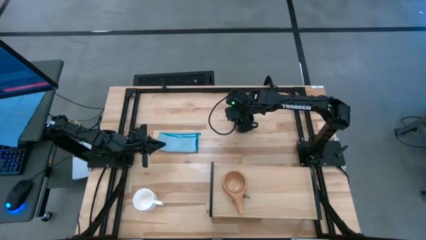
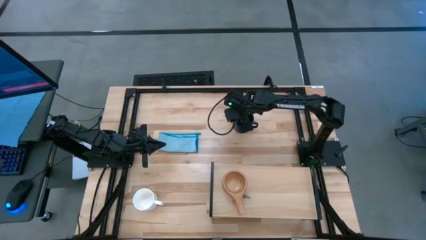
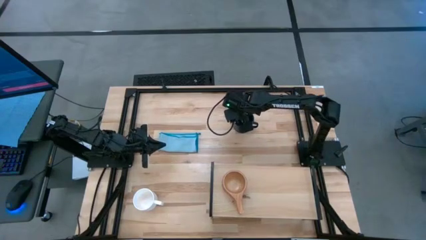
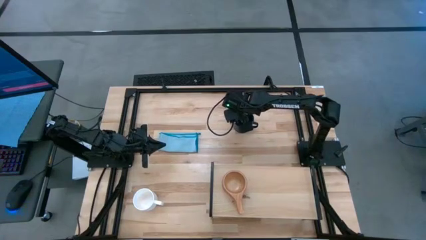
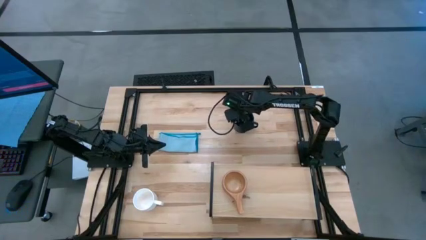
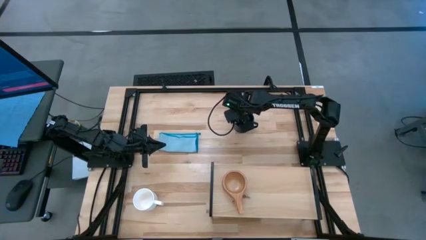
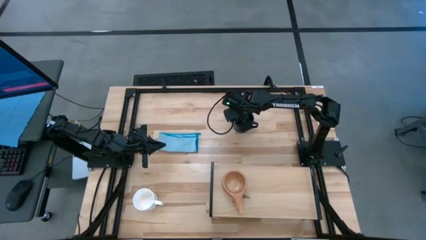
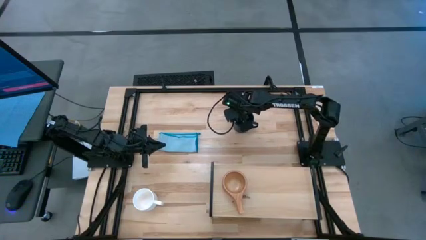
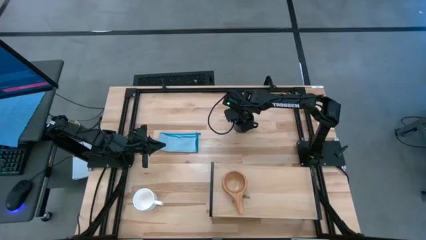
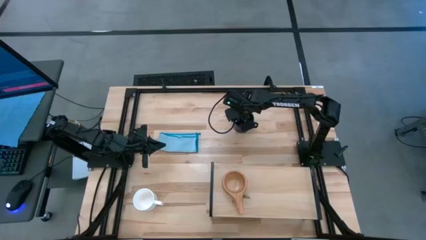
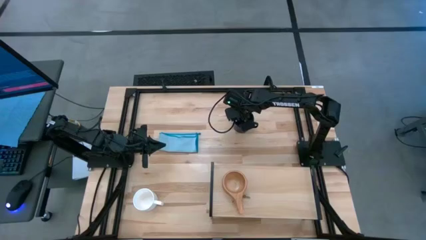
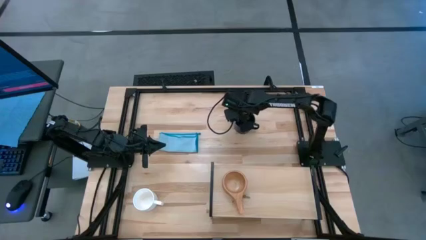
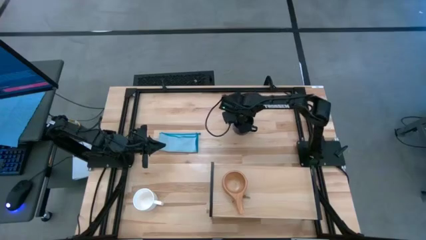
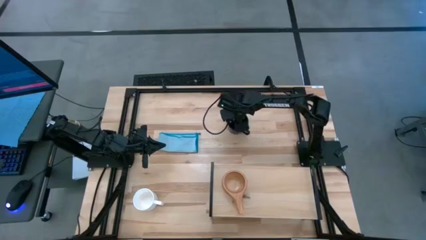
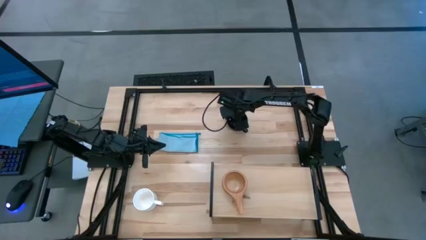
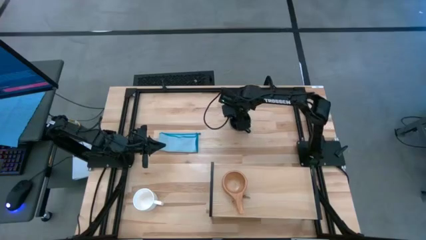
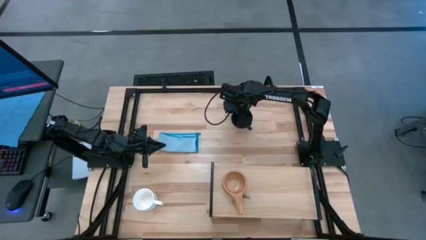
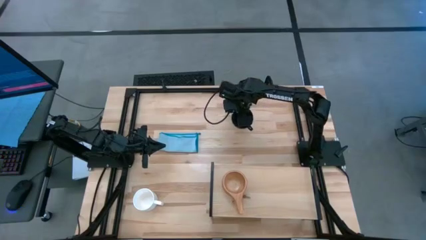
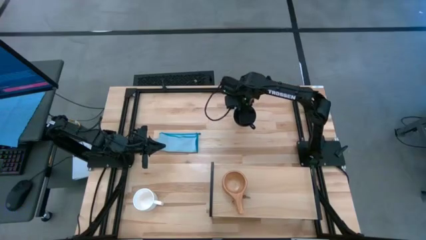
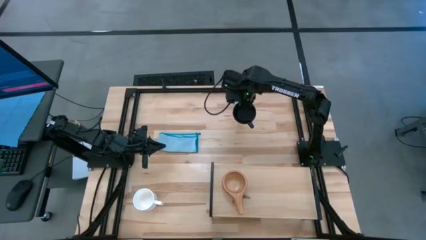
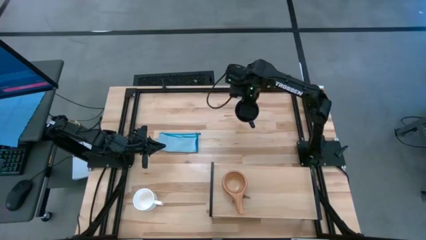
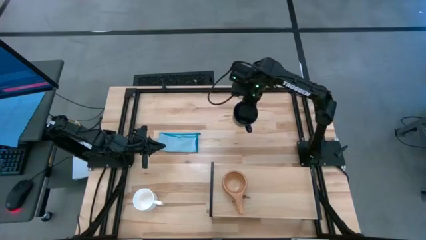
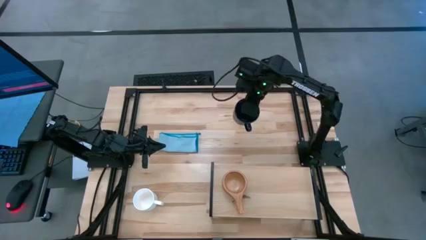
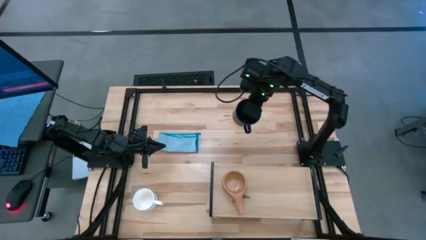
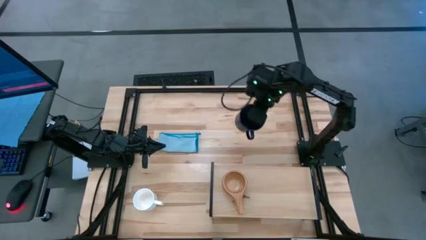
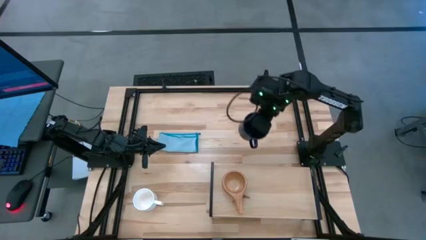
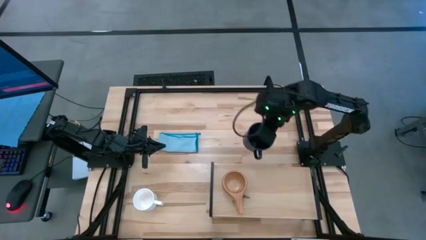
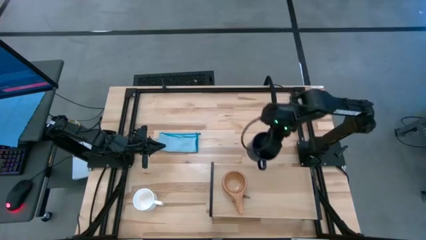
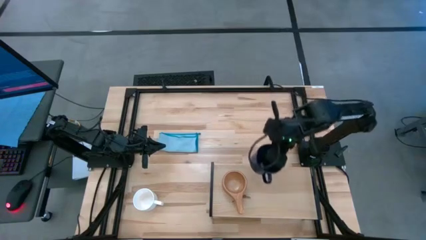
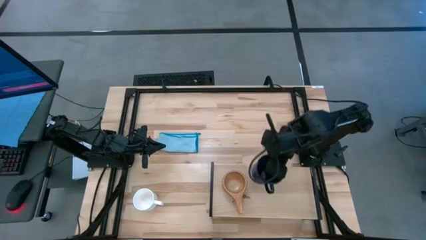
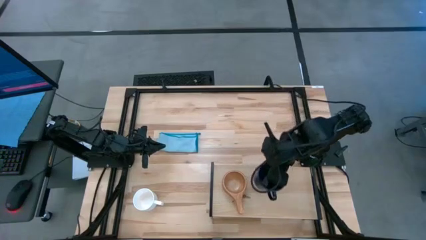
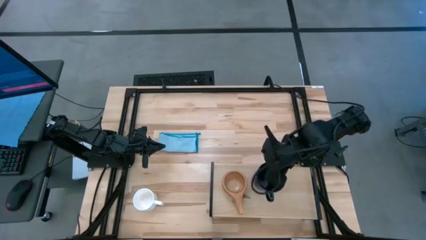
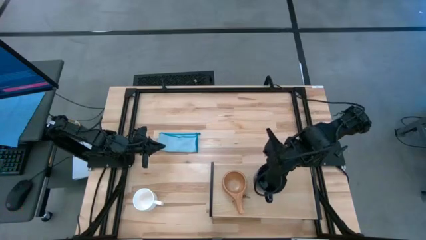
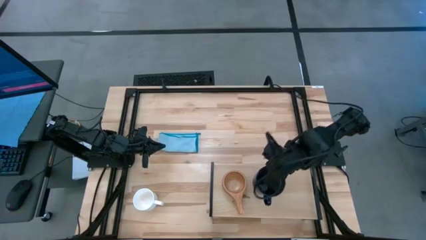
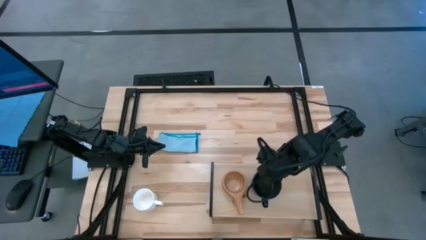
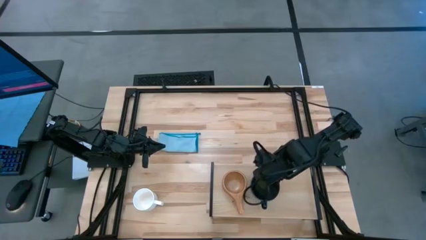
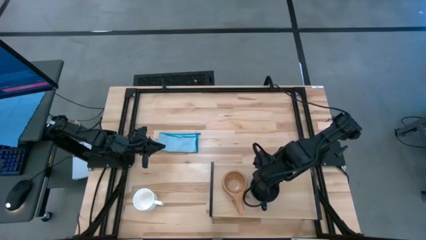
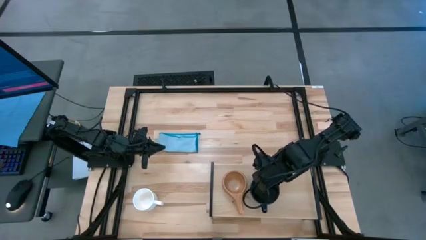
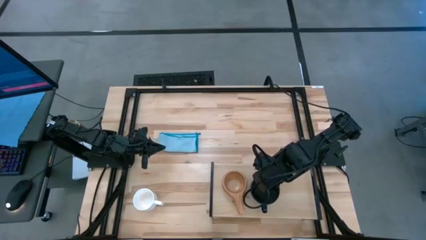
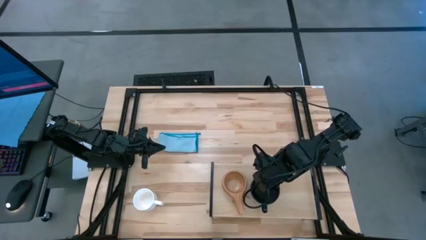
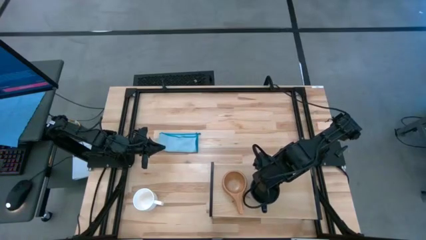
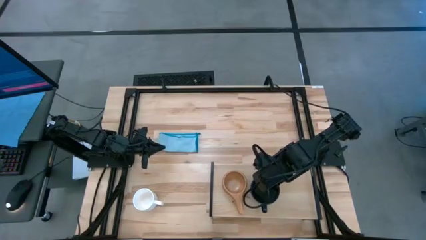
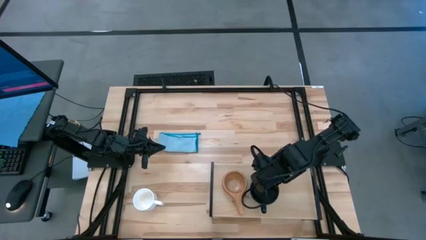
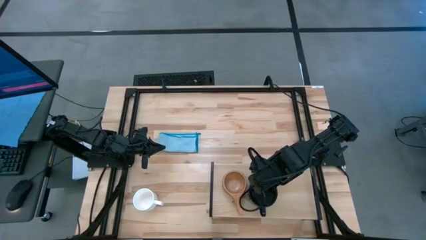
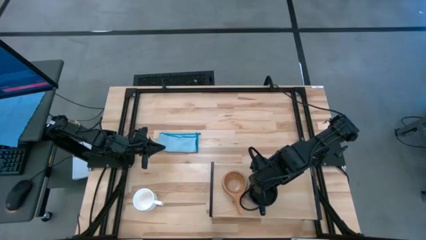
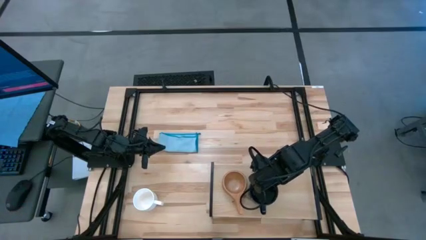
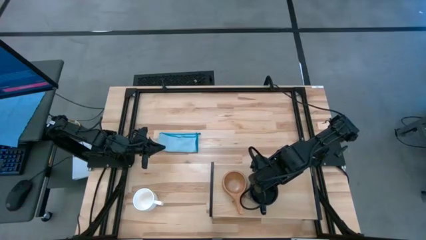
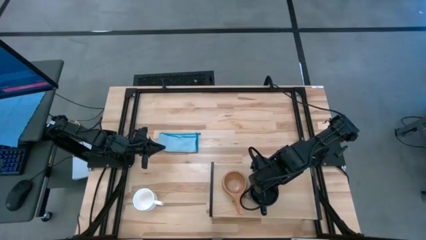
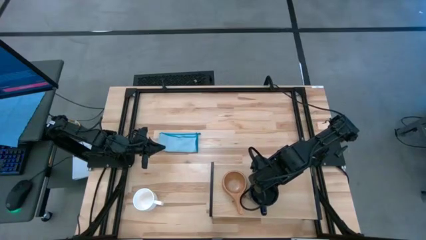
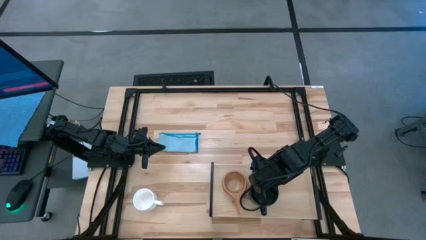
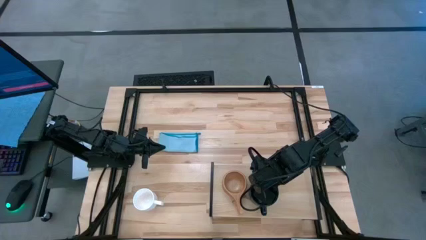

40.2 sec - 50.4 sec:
Task: Stack small to large cups/mugs on shelf
Put the black mug on the shelf

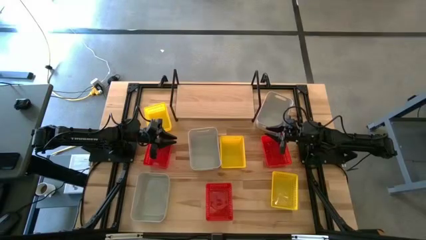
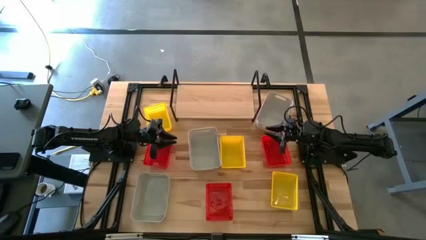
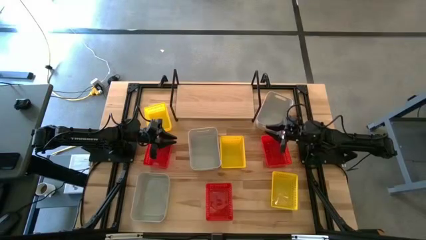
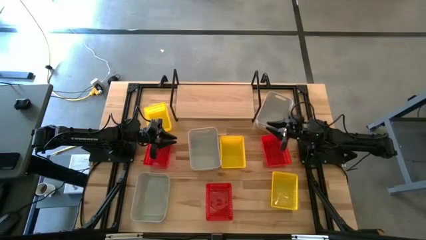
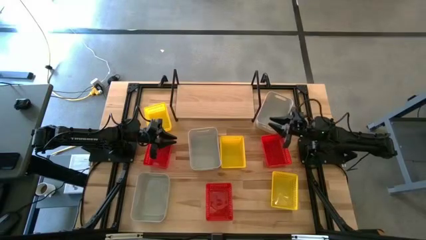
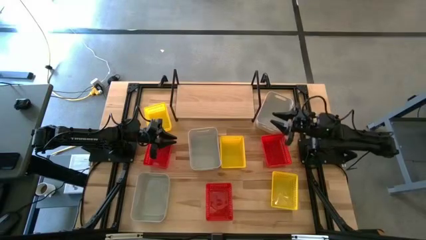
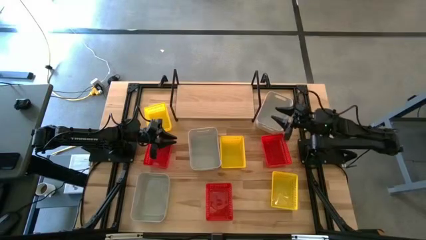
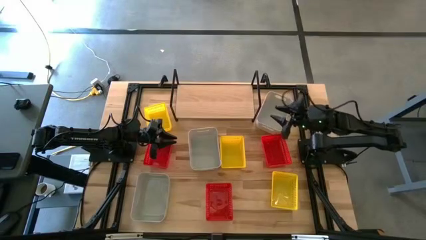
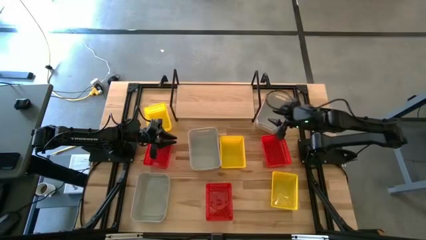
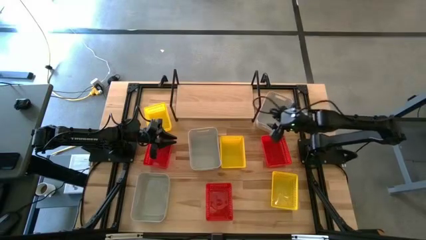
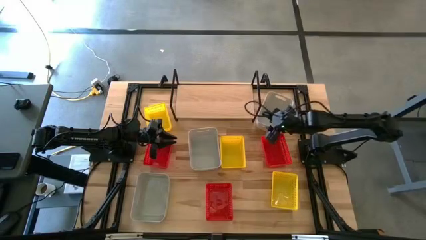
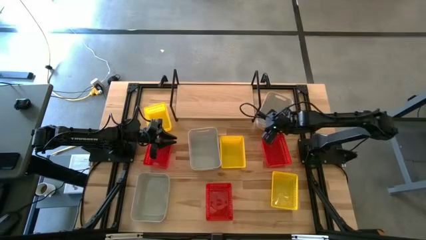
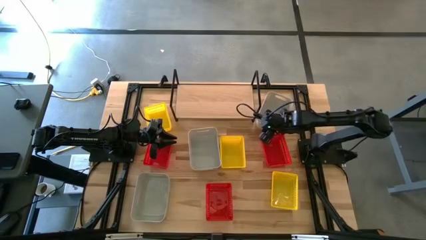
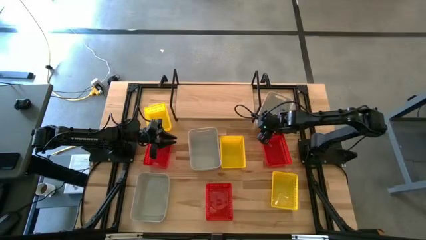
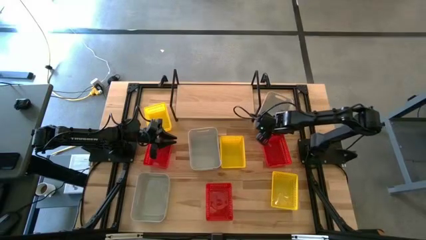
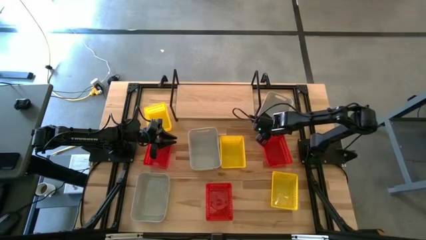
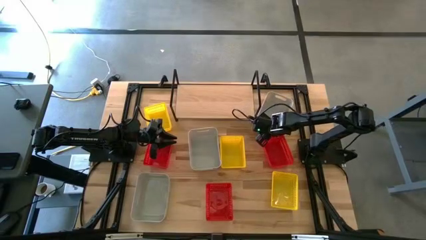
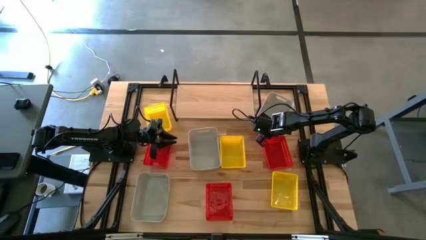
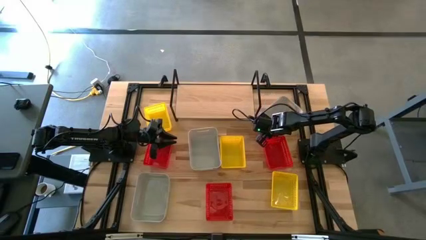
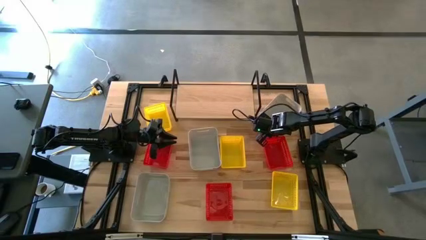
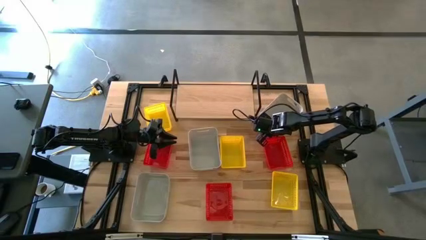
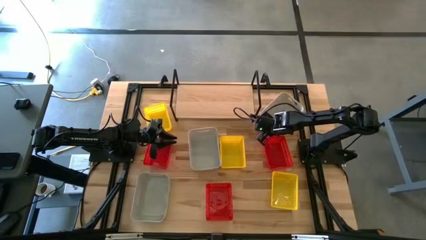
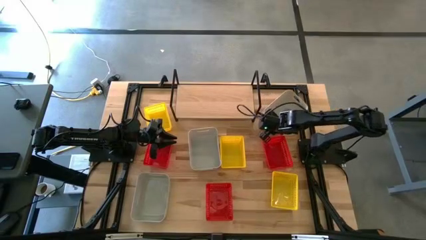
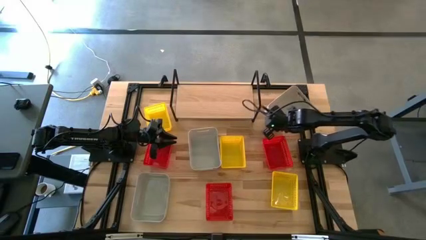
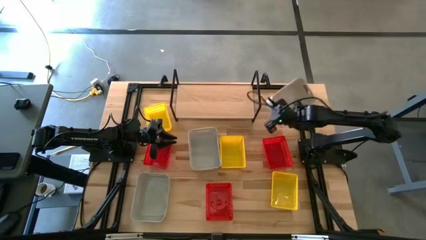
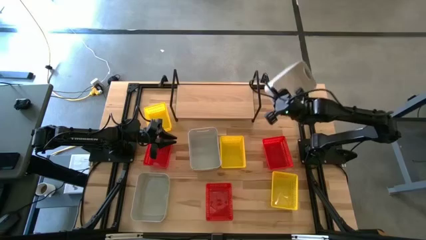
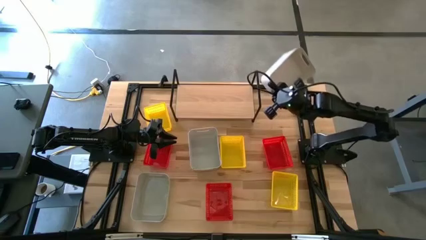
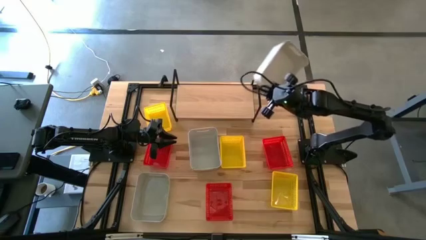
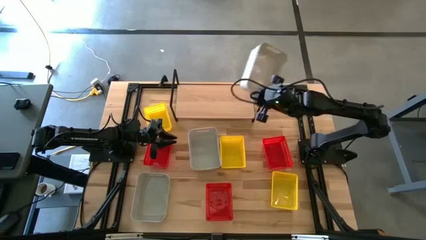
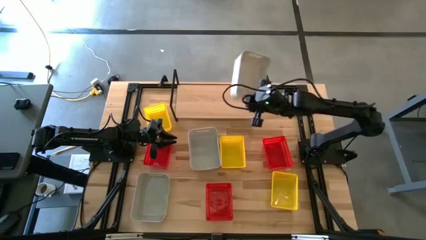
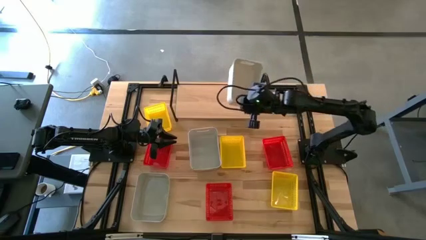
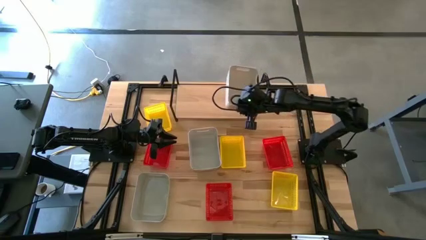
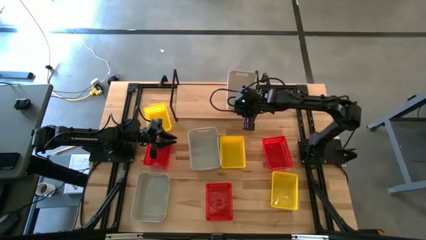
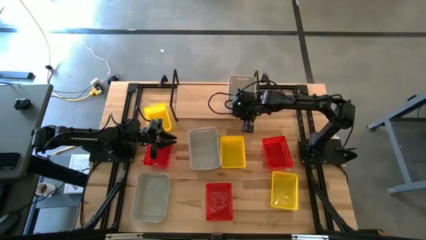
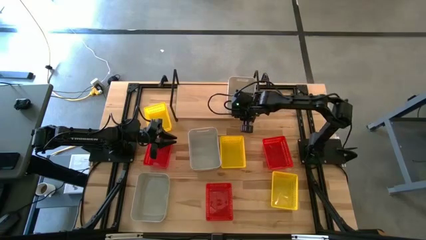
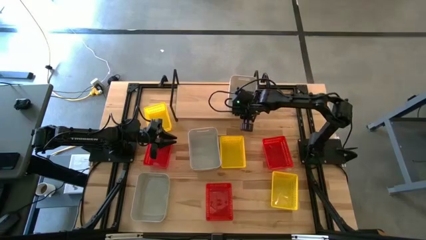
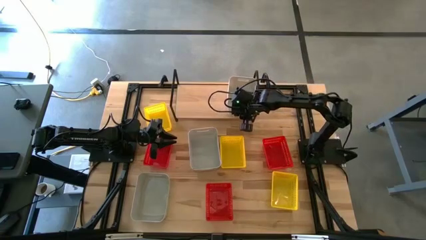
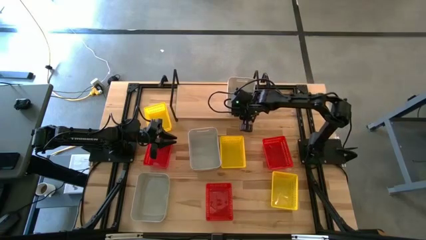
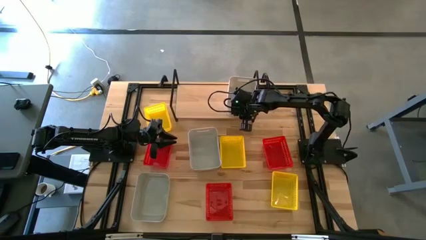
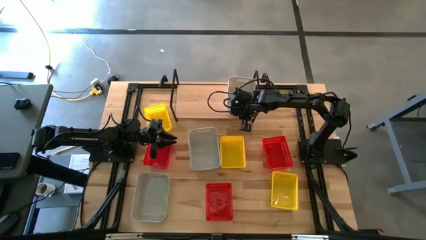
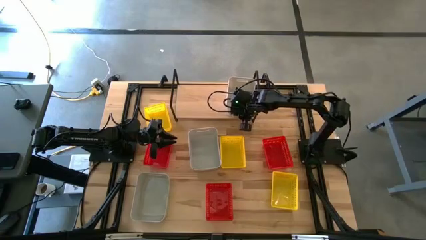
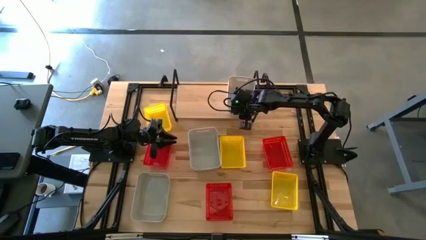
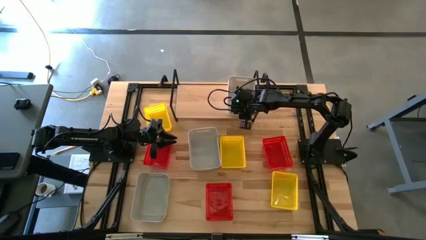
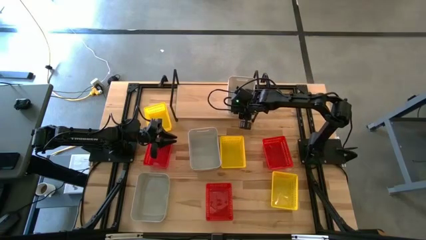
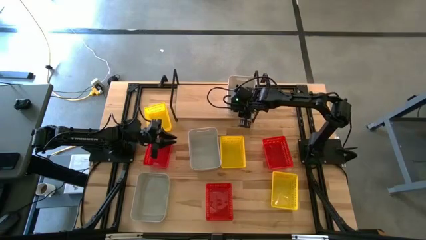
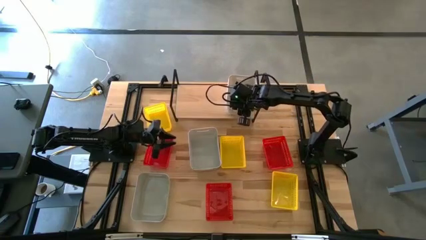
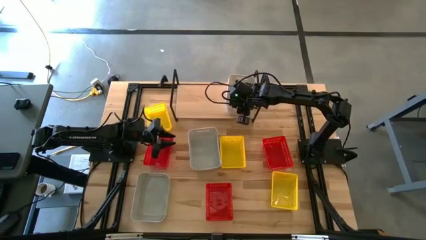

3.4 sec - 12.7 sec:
Task: Stack baskets on shelf by color
Put the top gray bin on the shelf
